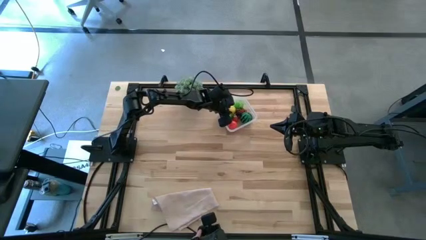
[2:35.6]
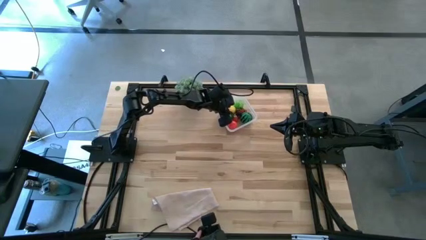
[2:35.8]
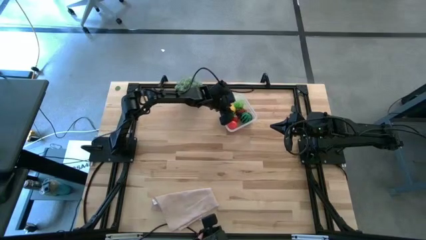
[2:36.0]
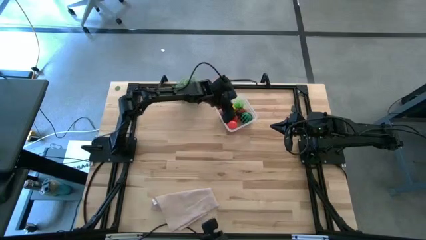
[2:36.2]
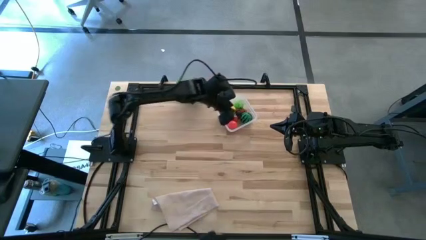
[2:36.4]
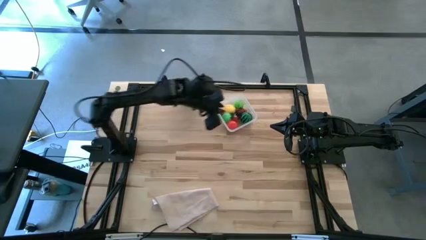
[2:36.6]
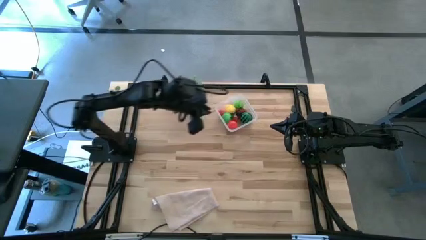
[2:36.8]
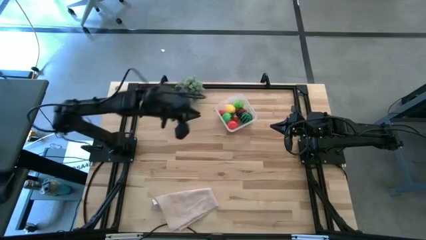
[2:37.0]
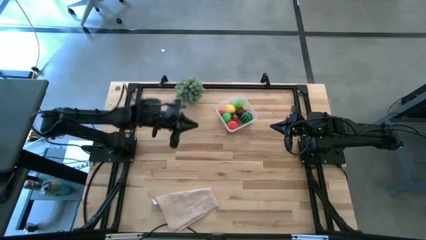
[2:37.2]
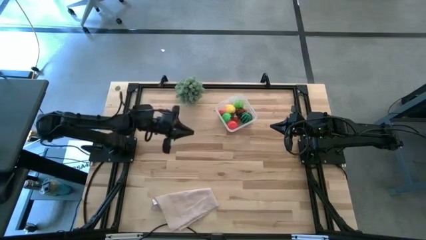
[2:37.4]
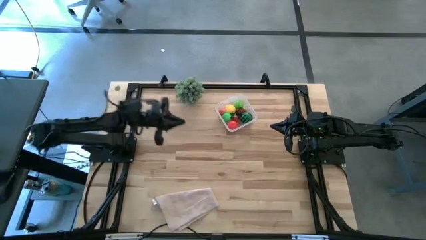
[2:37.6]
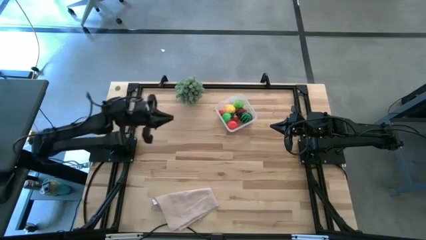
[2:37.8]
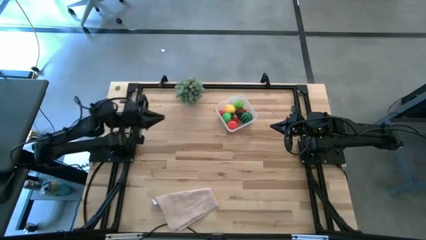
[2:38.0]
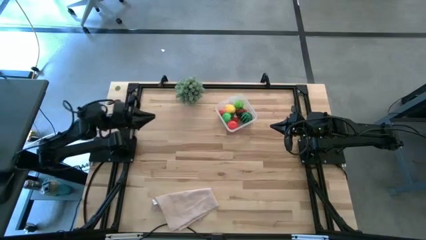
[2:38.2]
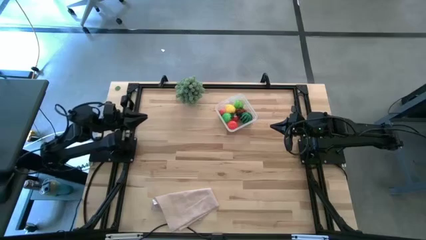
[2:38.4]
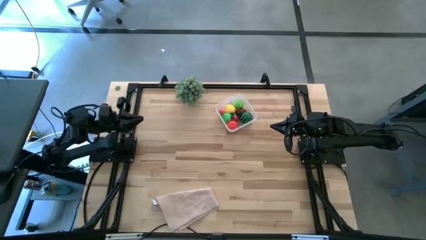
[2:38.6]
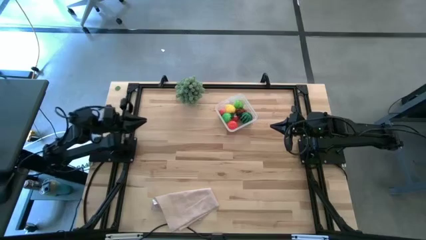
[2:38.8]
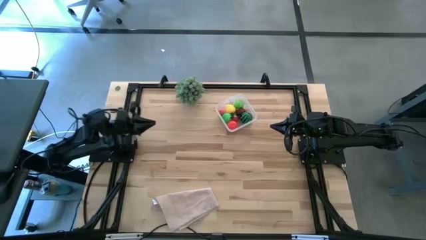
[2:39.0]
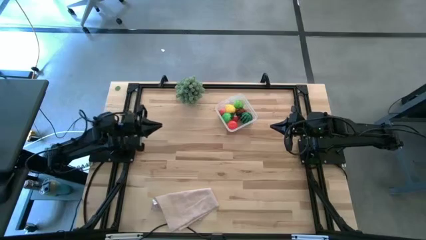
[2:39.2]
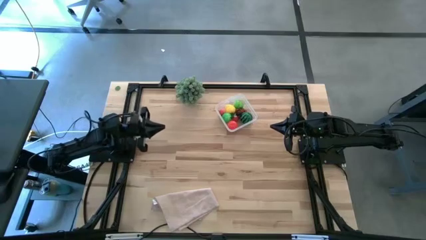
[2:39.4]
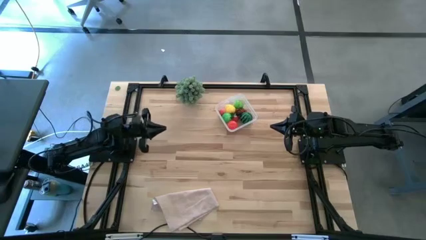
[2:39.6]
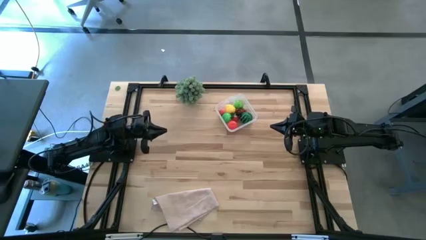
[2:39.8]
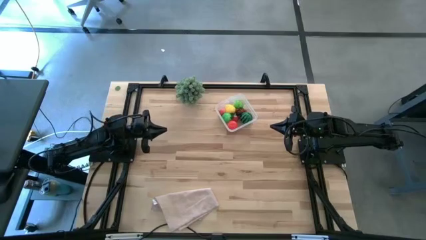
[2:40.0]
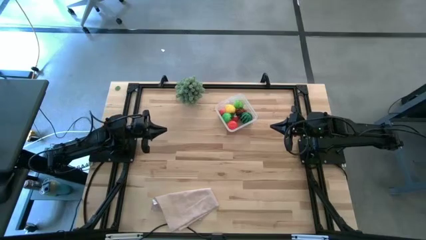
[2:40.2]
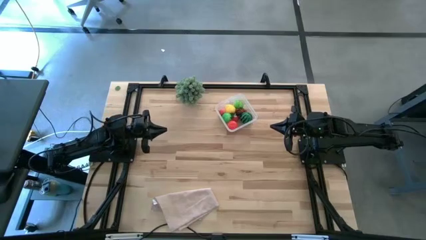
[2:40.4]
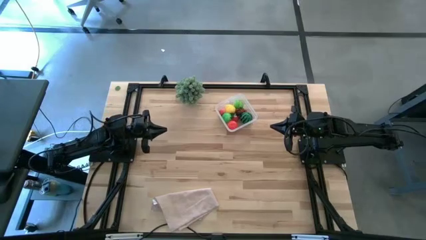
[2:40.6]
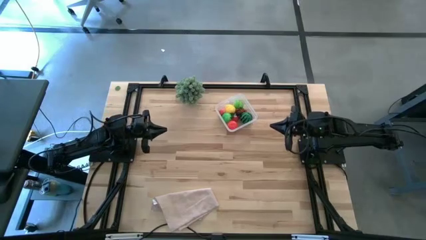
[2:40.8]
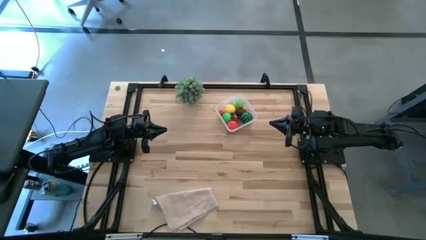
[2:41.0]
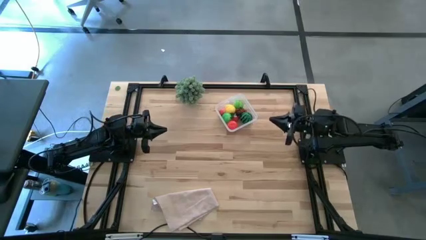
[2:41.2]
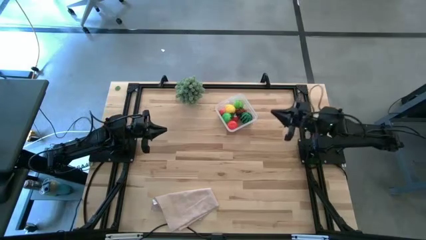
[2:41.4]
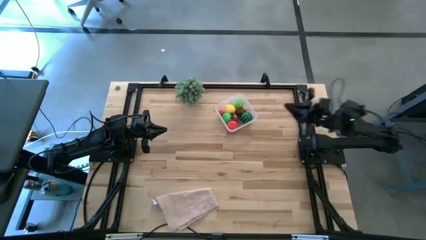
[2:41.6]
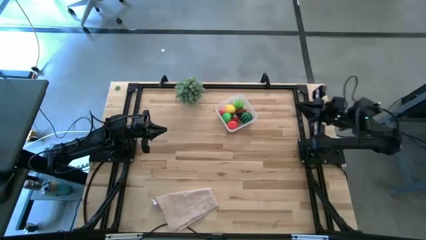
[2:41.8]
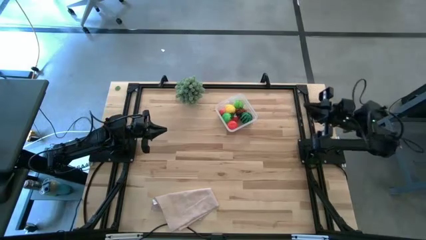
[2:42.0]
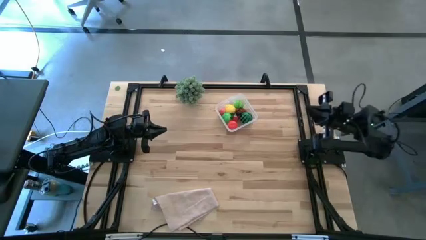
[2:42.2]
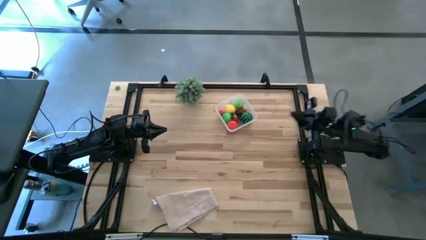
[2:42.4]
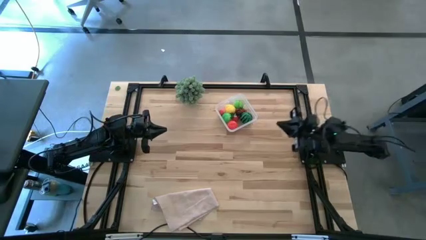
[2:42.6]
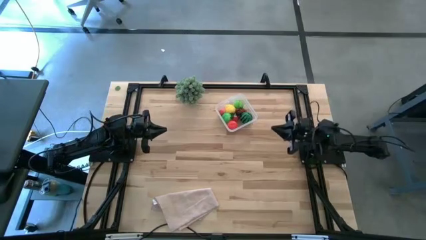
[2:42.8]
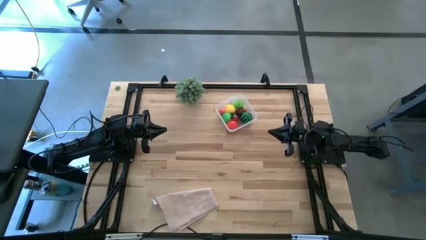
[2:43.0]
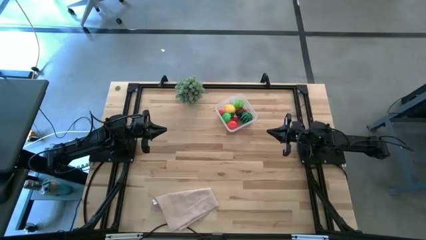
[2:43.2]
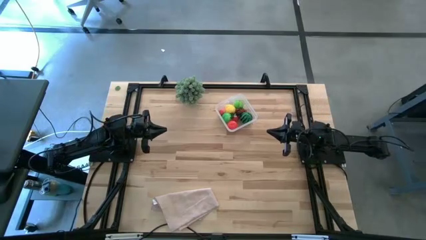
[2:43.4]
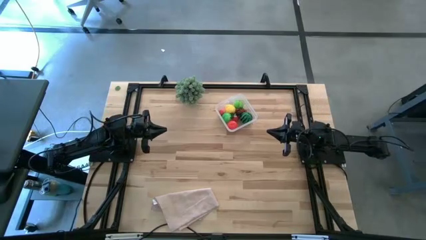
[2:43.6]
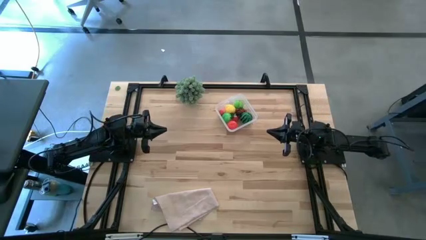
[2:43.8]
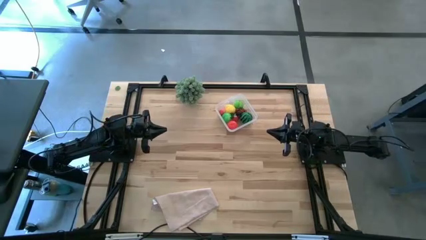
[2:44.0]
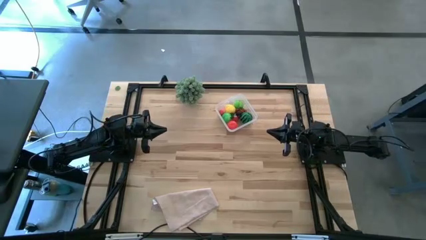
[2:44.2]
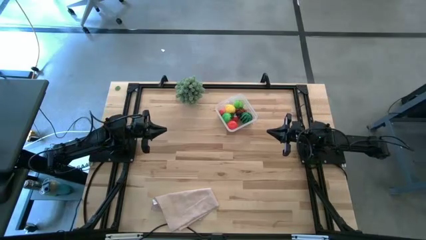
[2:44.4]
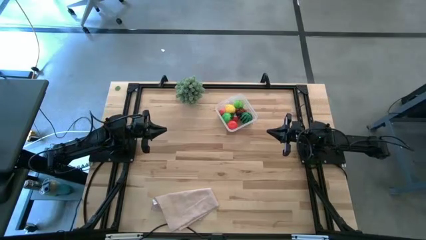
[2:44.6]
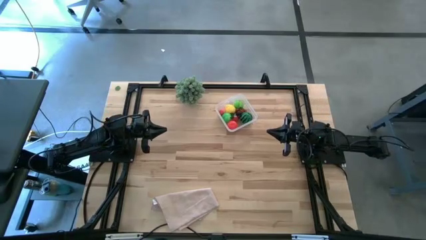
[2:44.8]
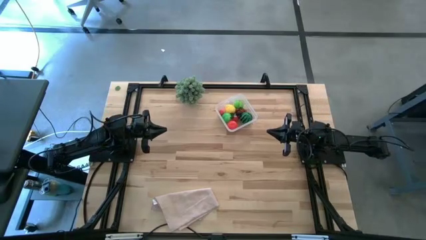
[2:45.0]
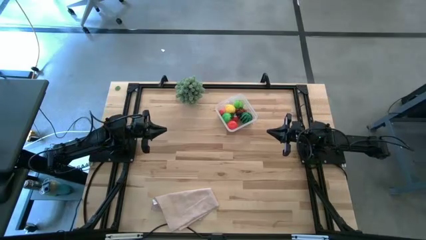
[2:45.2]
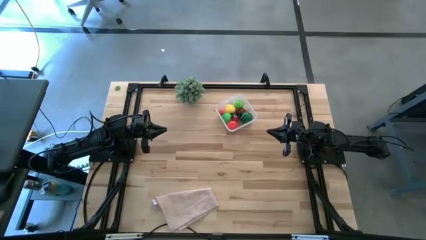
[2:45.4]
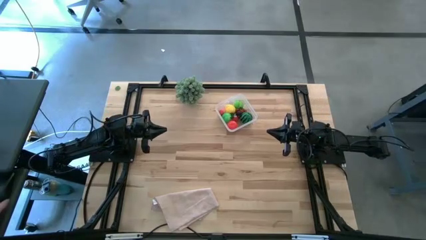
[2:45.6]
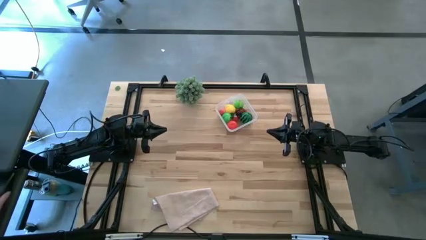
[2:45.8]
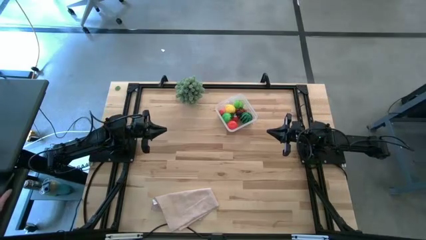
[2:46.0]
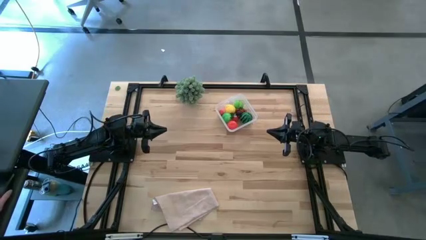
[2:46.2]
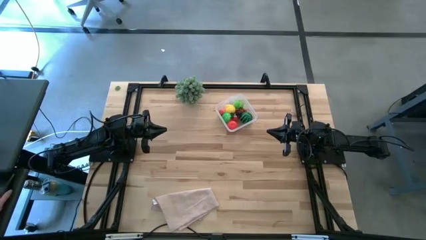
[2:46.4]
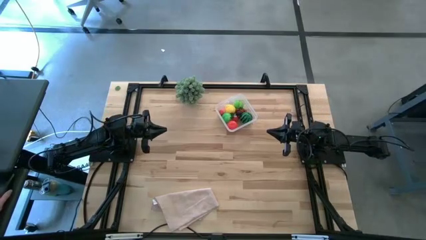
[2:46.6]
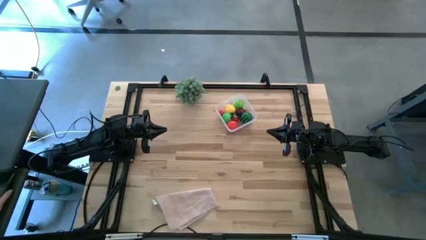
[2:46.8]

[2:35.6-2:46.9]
Task: Pick and placing Produce into tupperware
Return to Home Position

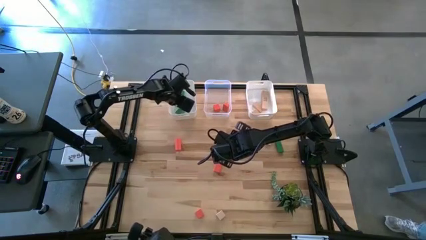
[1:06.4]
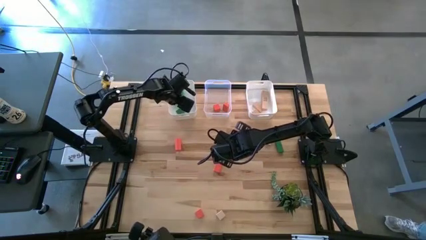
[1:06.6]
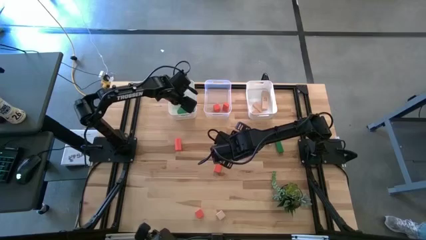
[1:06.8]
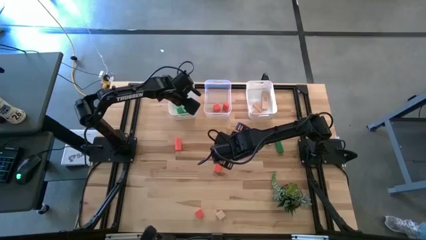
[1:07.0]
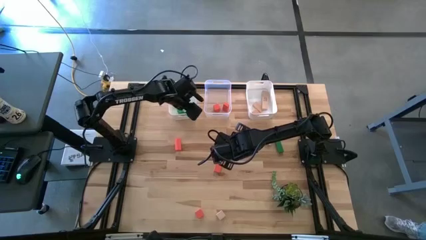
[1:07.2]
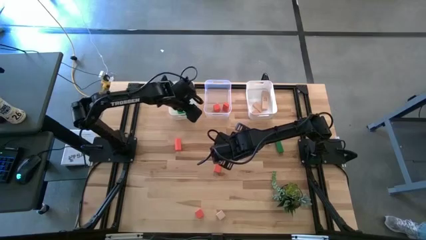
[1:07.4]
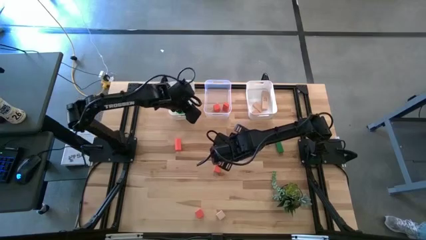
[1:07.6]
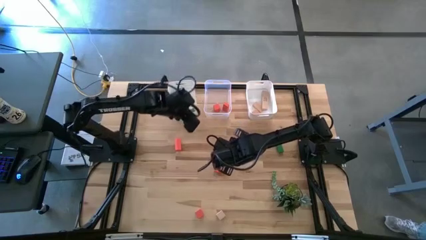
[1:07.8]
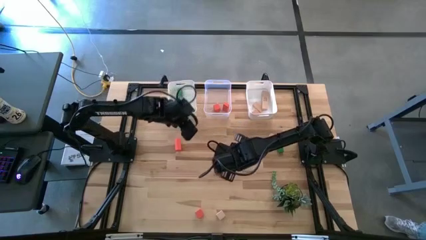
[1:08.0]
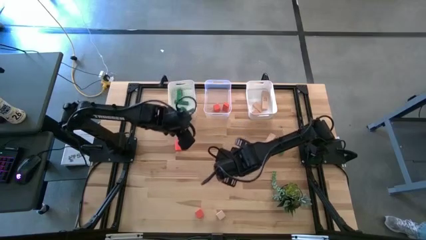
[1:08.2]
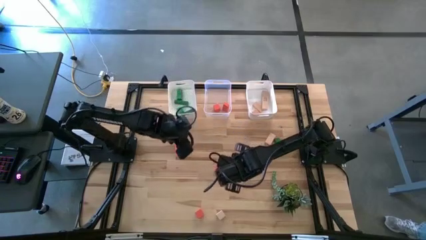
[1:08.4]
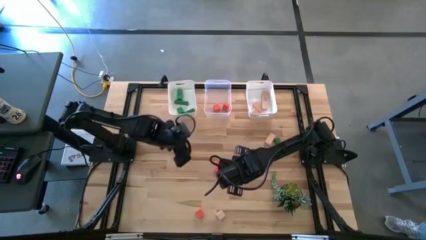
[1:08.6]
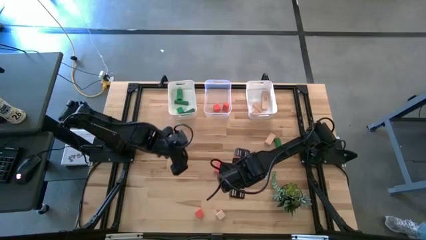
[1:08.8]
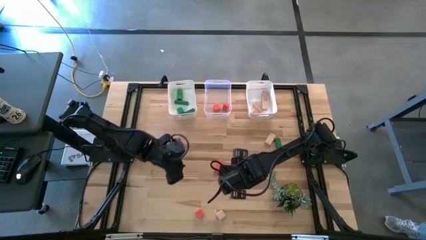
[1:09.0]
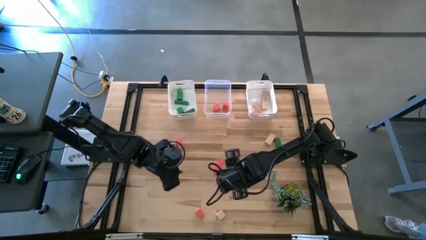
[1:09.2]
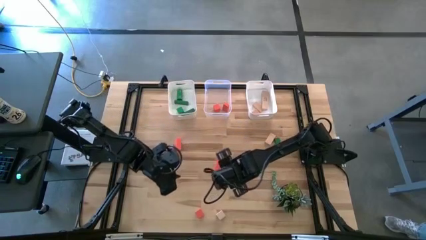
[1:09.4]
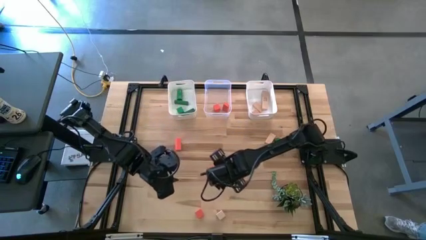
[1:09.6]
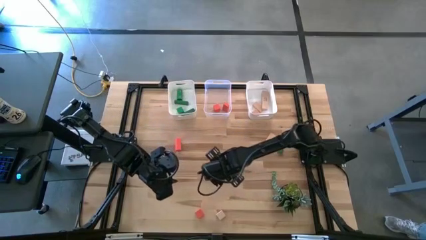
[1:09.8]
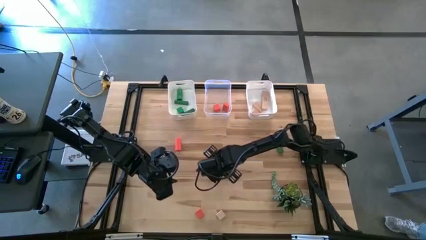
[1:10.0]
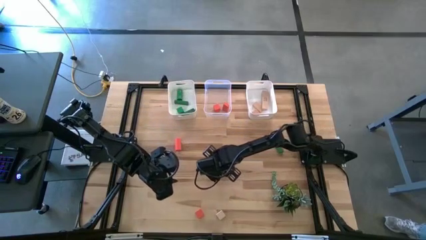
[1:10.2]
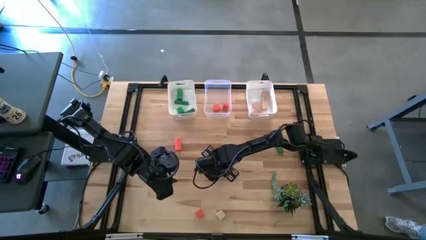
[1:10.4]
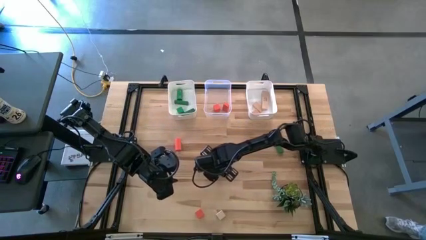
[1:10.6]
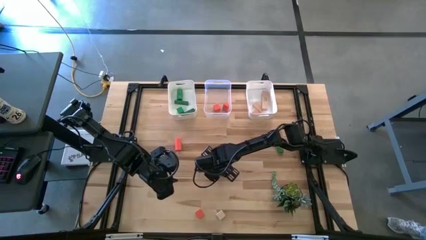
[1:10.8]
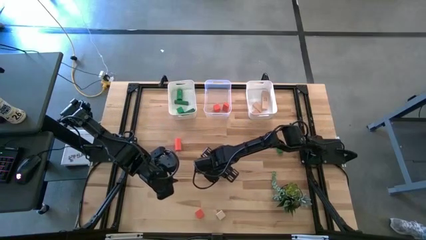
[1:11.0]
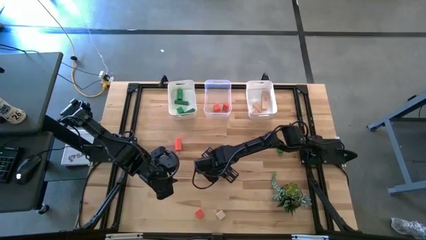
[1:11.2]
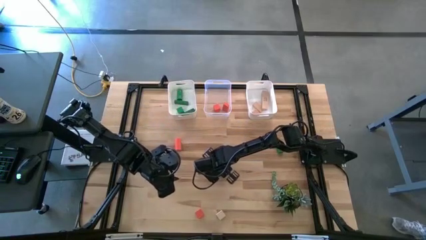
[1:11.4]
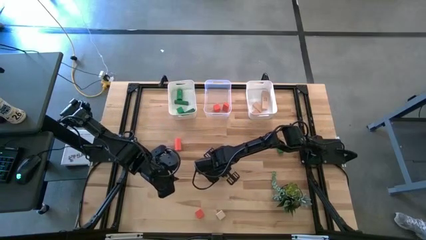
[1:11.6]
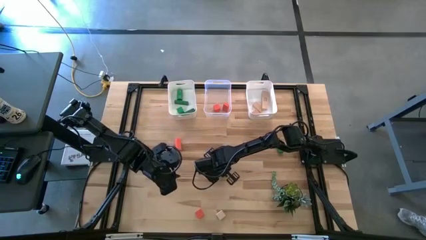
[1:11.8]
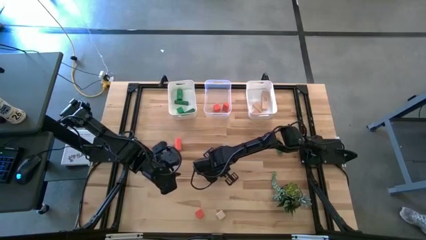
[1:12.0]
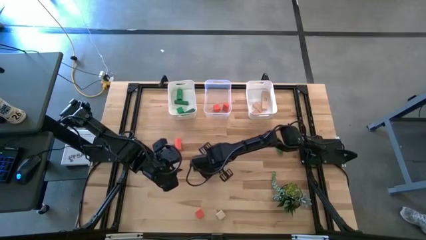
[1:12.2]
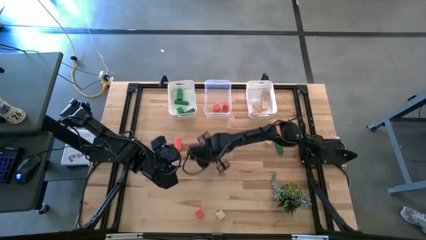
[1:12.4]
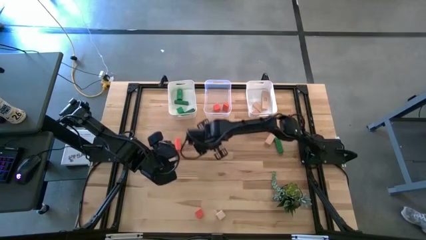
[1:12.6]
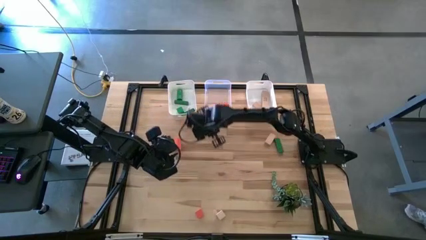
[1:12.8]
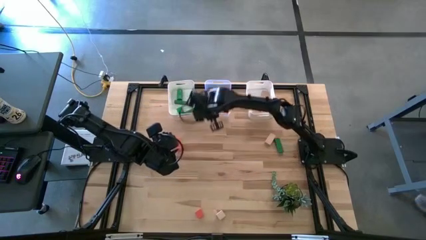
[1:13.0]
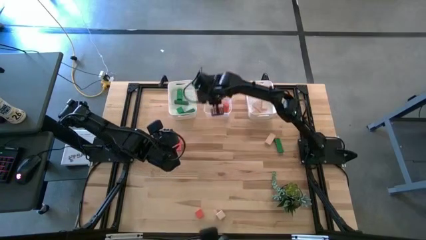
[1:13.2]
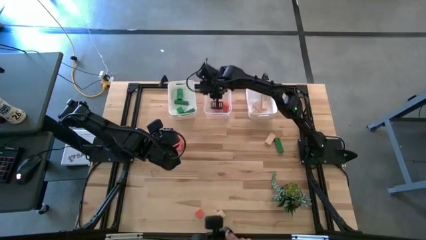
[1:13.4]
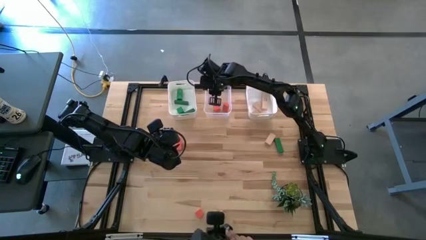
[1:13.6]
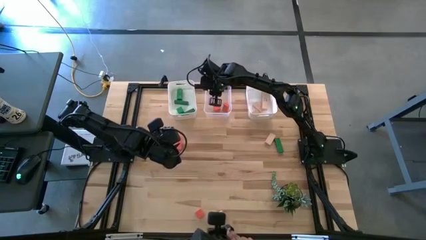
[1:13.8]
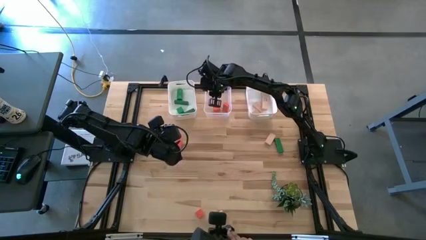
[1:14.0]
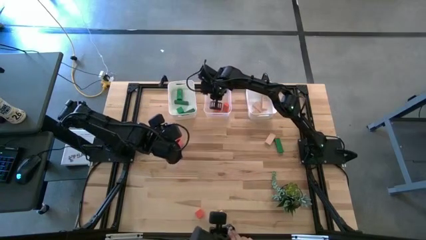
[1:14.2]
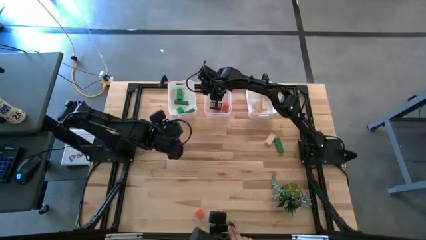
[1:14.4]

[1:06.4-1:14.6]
Task: Sort & place blocks by color
Put the orange block into the transparent bin
